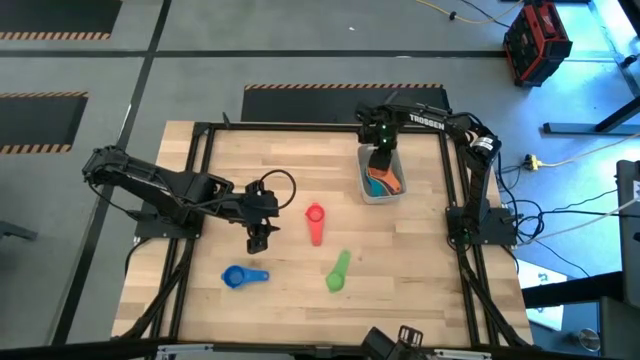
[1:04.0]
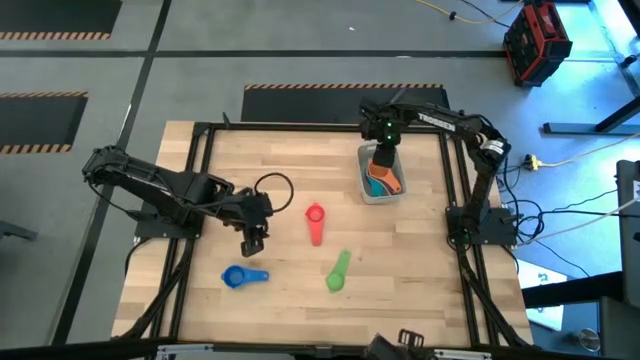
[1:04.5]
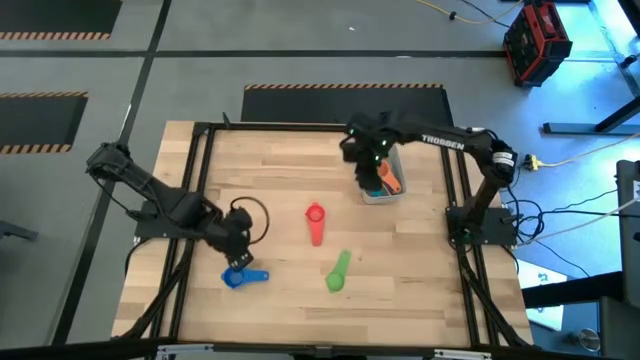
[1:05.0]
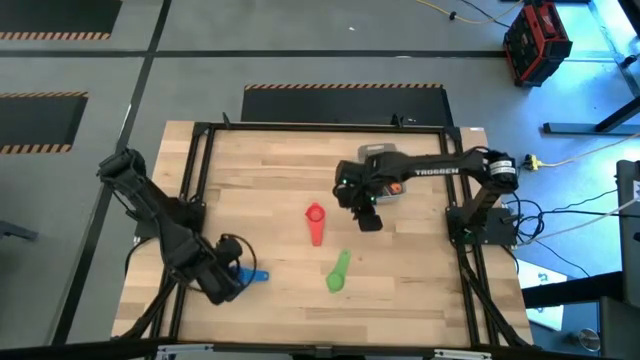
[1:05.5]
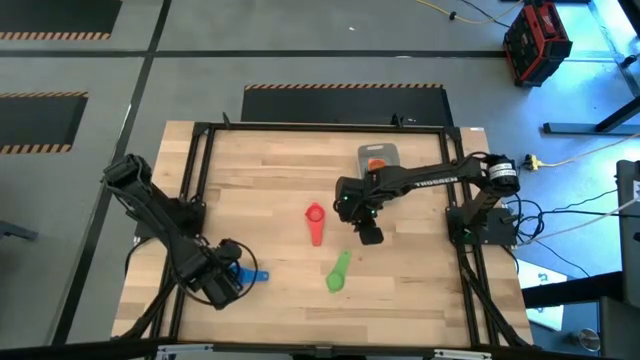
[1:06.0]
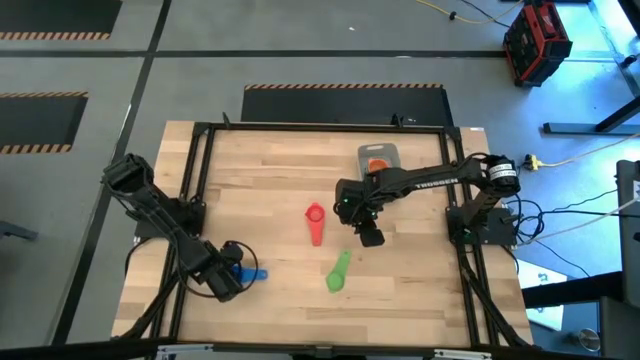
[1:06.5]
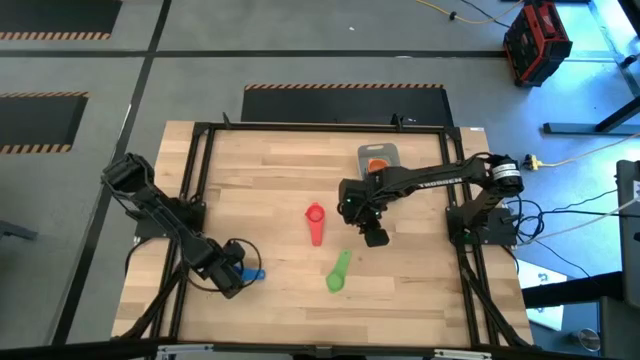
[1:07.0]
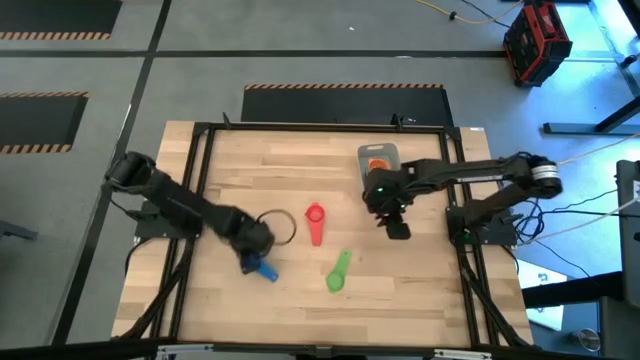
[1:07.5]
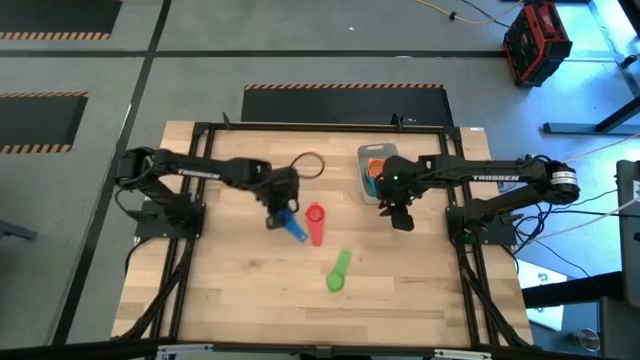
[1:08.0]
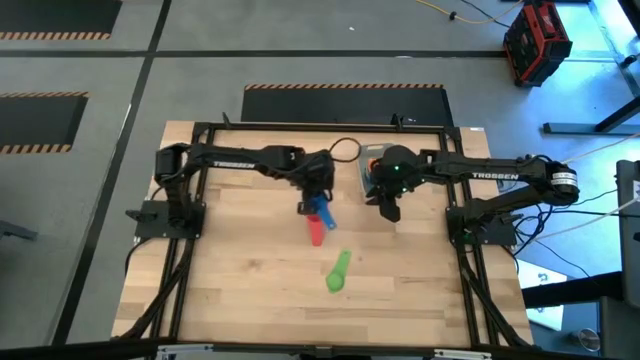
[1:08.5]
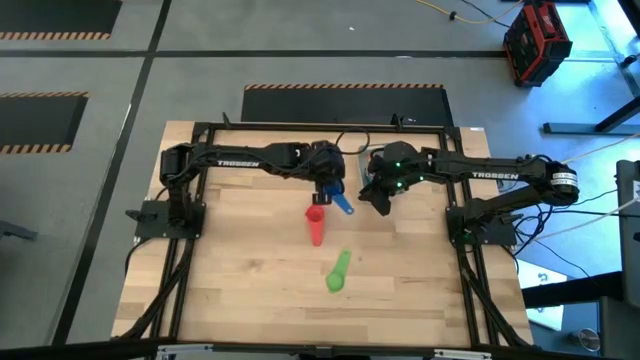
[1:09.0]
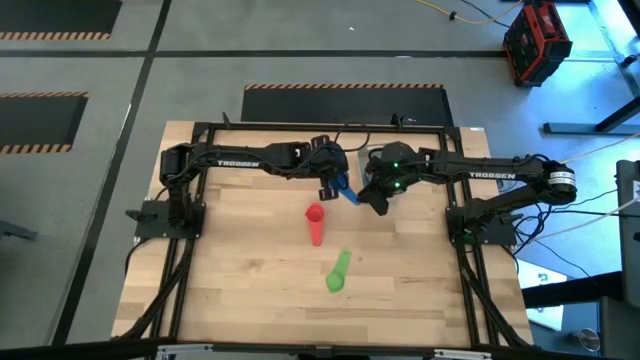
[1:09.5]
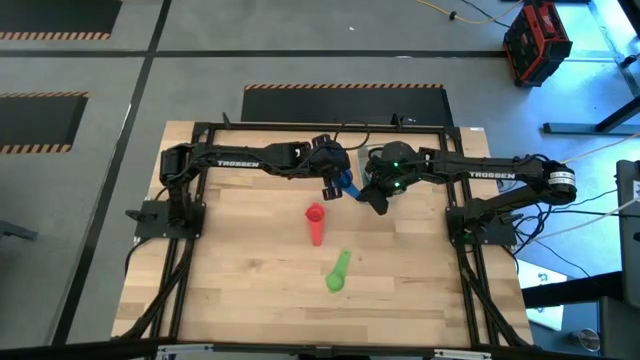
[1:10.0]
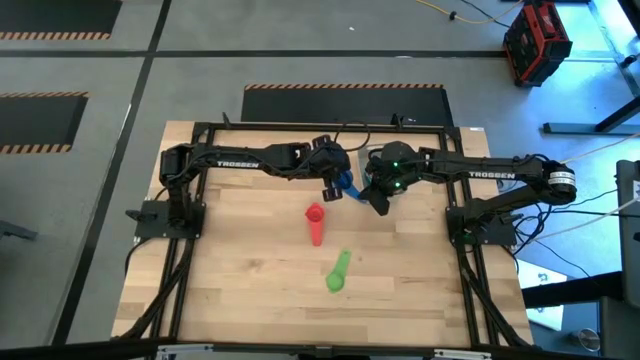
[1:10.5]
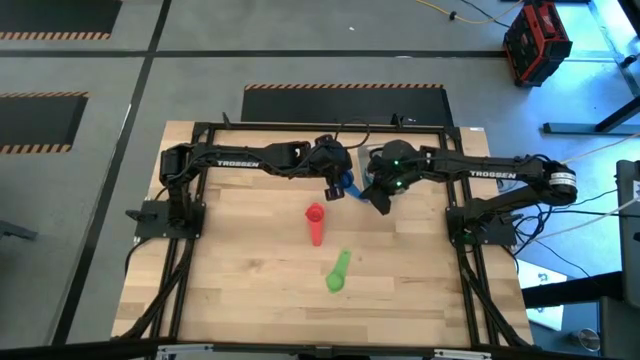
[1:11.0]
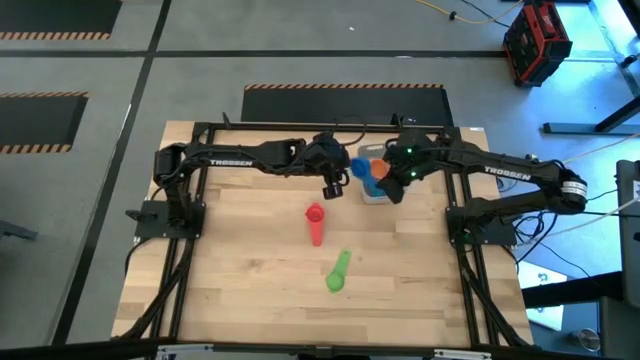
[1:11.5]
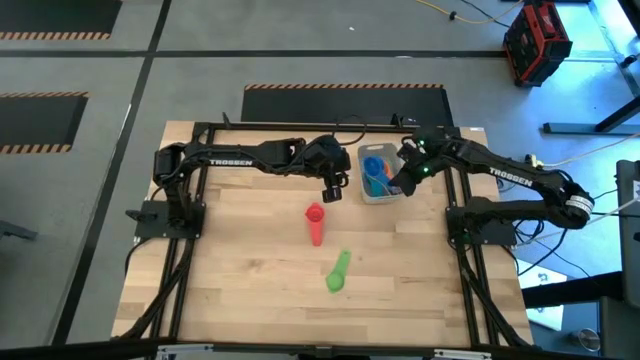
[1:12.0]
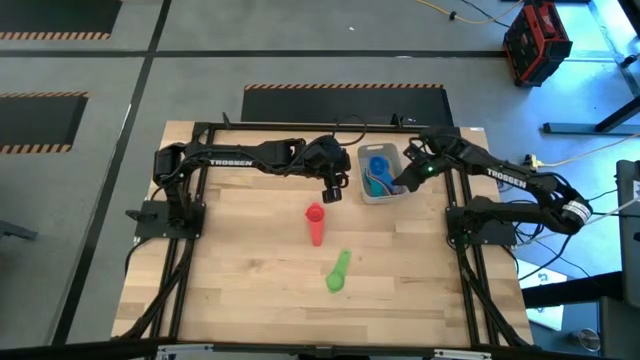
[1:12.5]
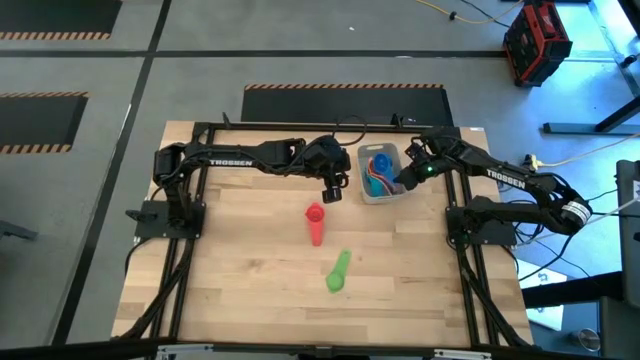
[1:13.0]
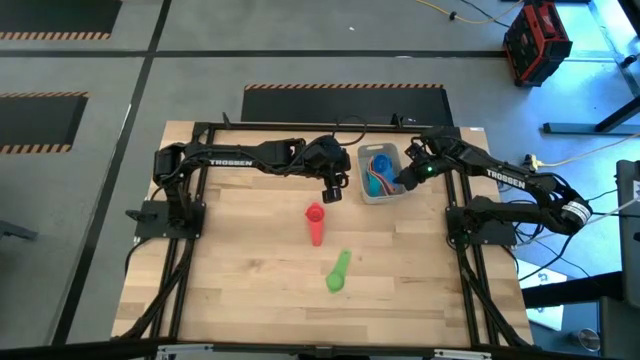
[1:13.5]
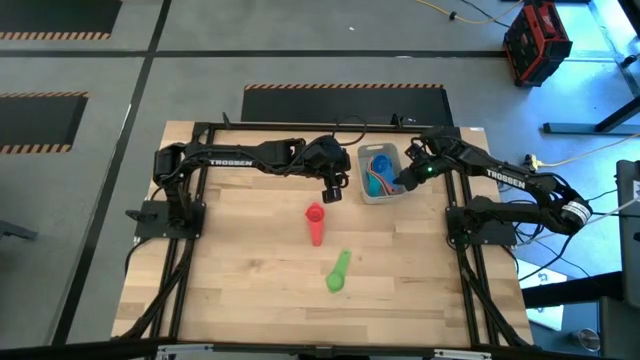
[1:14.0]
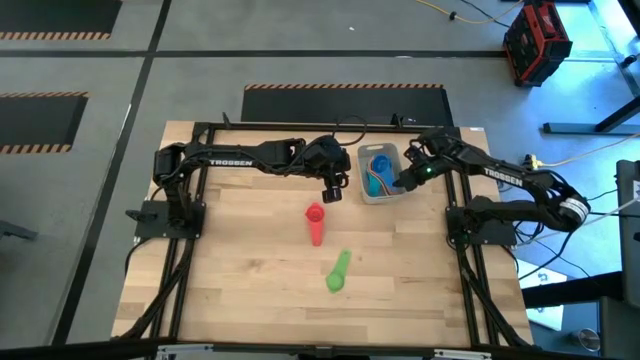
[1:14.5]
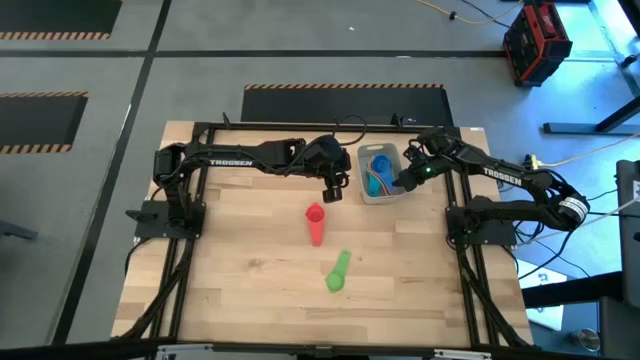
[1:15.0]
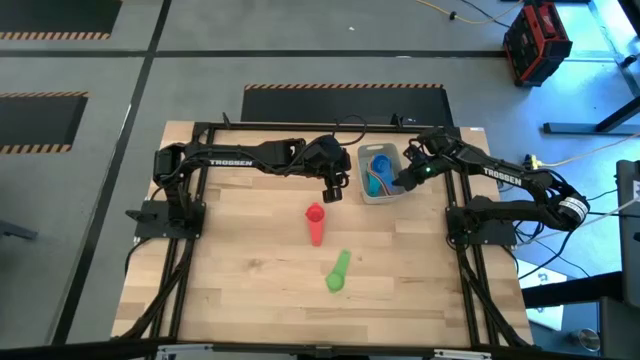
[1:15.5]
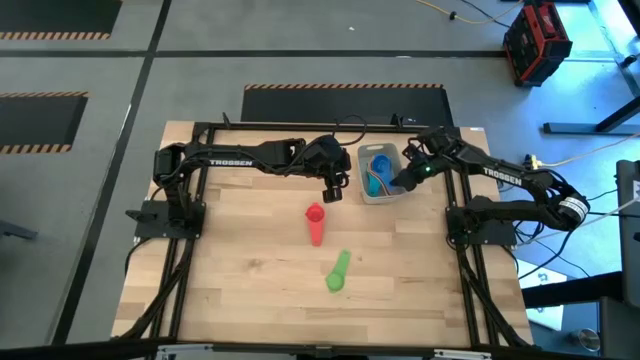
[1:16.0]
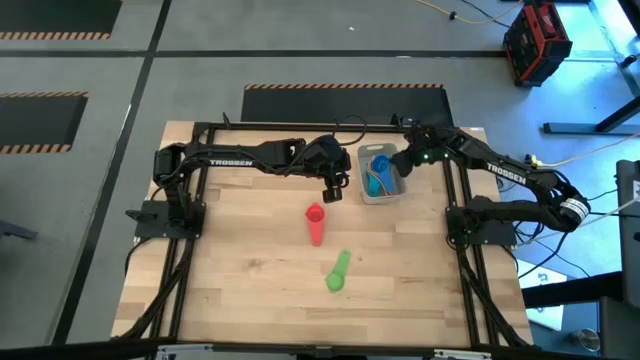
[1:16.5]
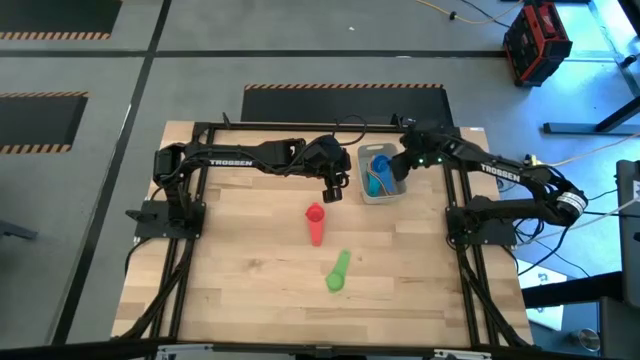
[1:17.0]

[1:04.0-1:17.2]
Task: Nest measuring cups in basket
Stack the blue measuring cup on top of the orange measuring cup in the grey bin

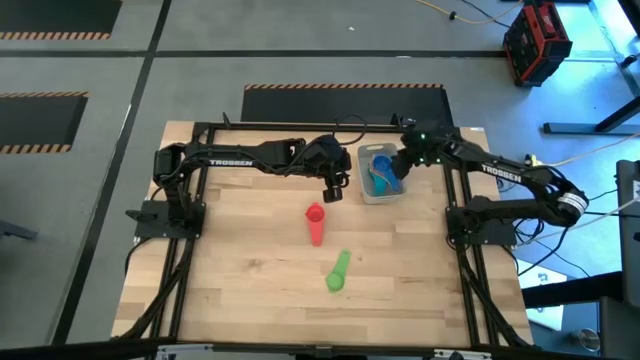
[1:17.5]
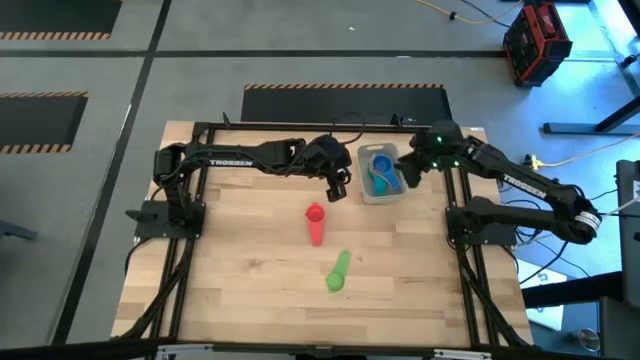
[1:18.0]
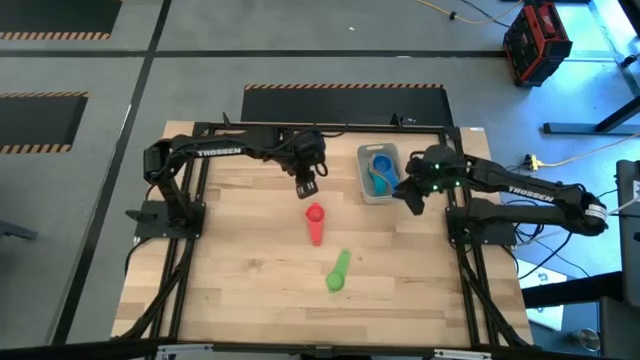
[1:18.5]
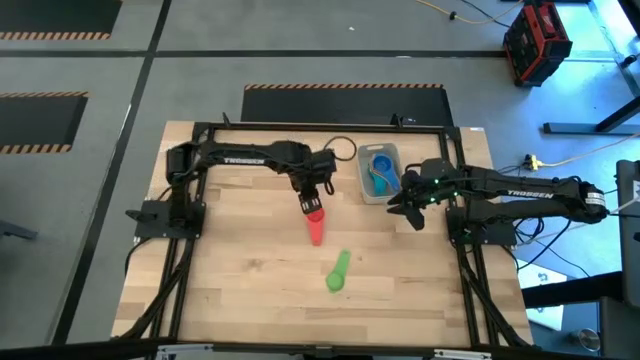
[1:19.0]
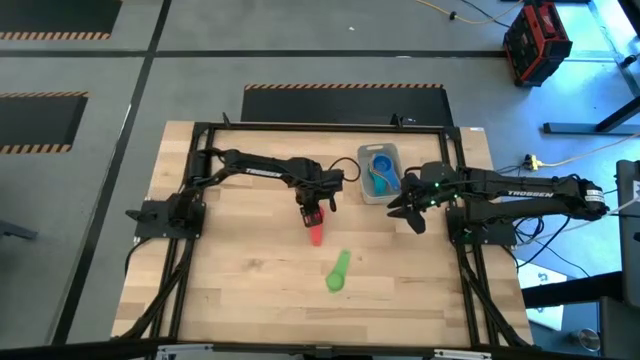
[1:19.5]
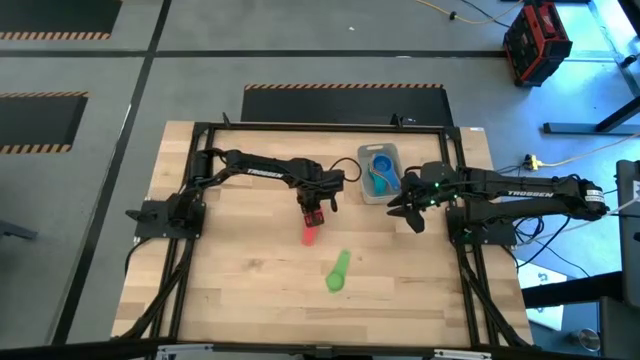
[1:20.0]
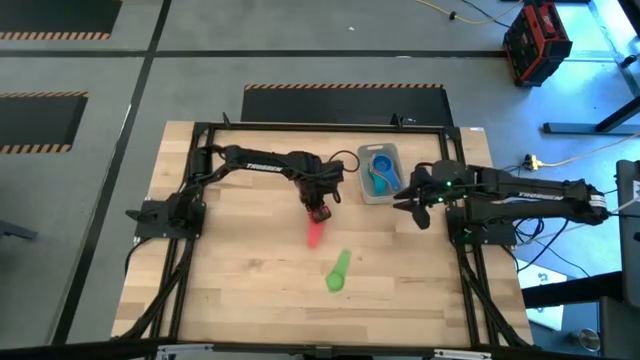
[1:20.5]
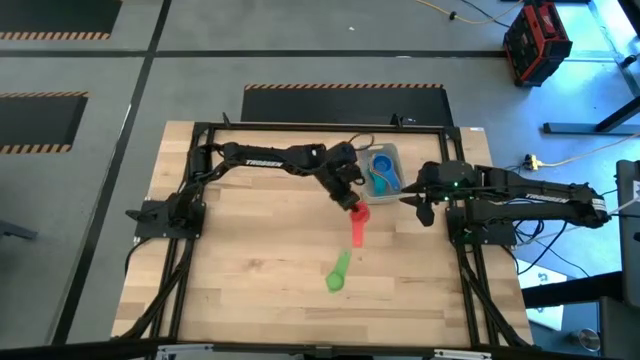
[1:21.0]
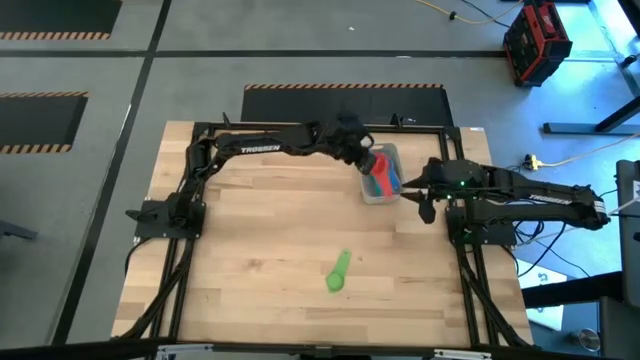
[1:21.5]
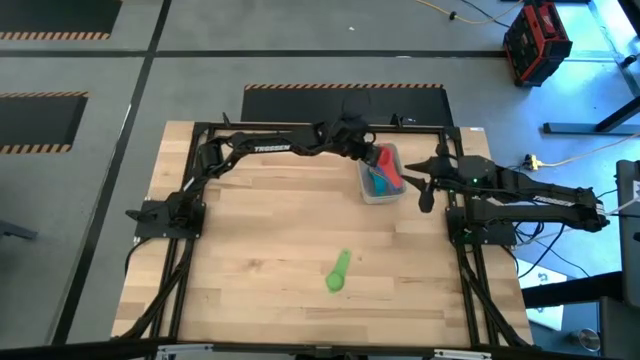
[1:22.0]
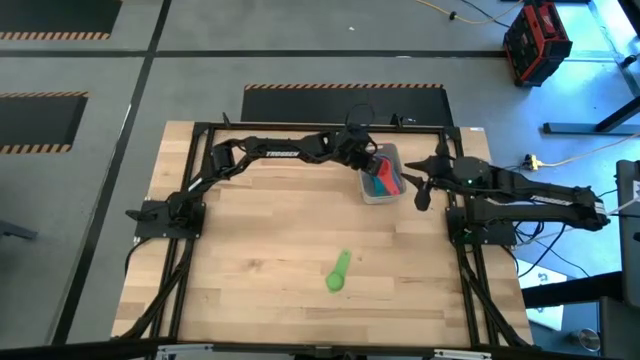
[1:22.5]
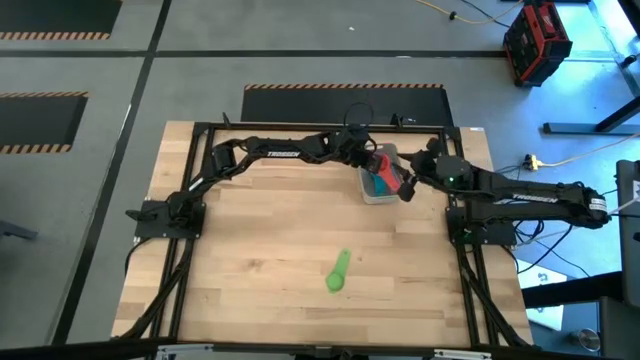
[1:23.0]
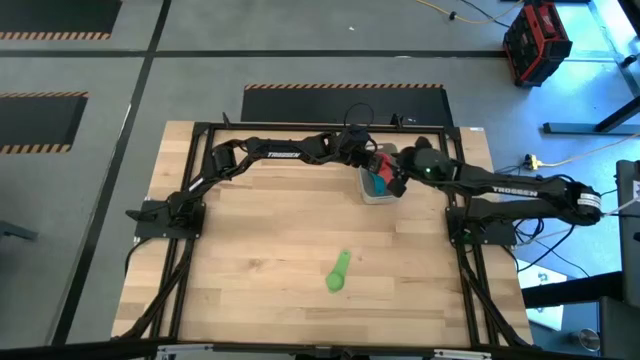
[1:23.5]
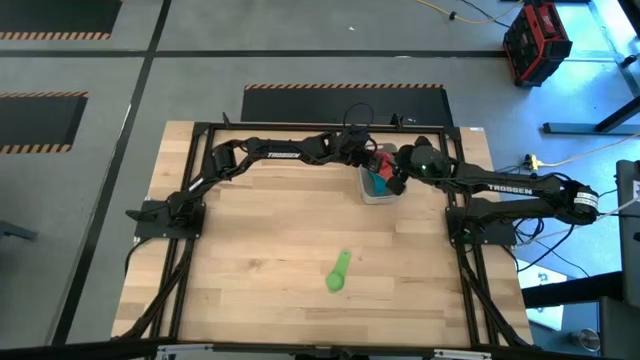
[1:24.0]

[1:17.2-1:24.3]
Stack the red measuring cup on top of the blue measuring cup in the grey bin
